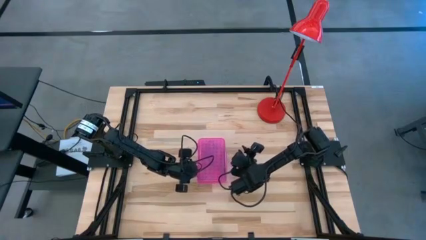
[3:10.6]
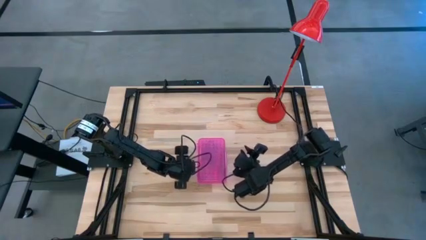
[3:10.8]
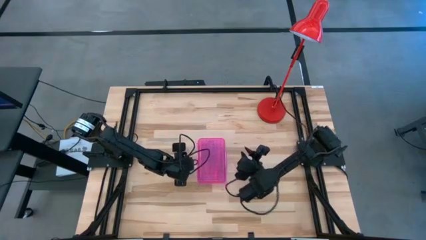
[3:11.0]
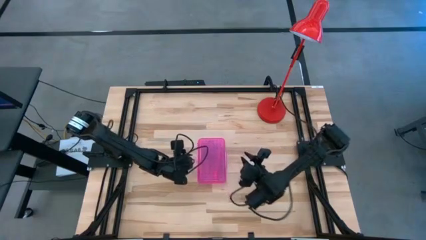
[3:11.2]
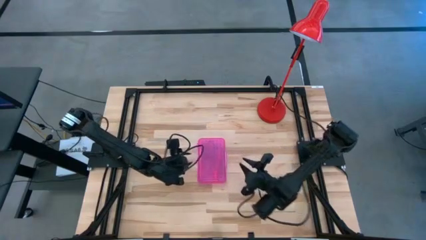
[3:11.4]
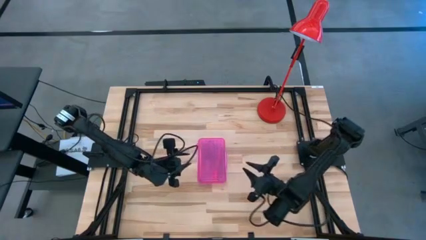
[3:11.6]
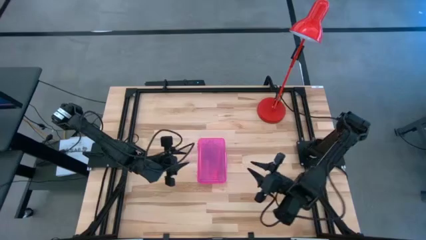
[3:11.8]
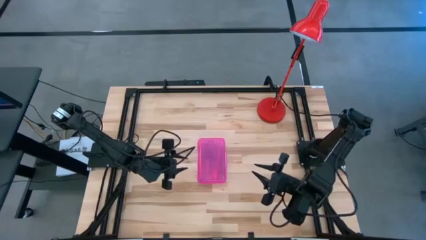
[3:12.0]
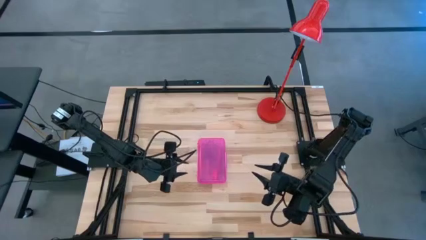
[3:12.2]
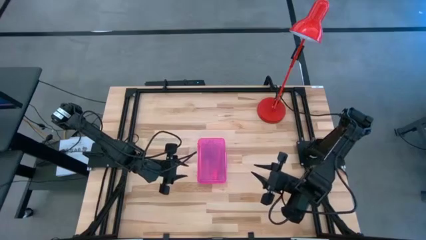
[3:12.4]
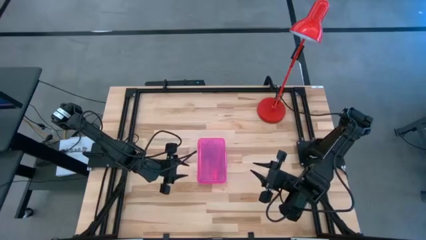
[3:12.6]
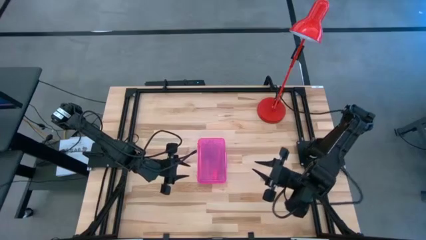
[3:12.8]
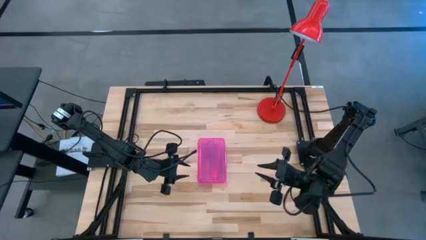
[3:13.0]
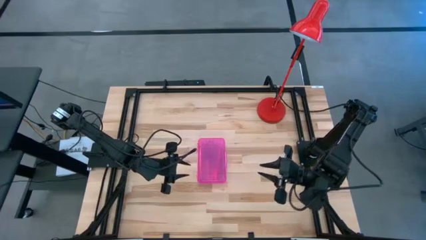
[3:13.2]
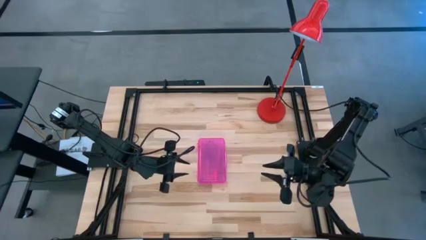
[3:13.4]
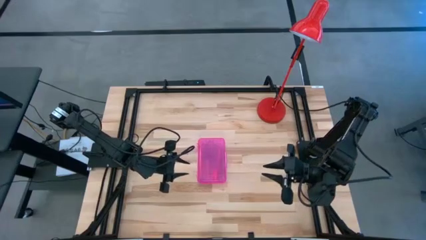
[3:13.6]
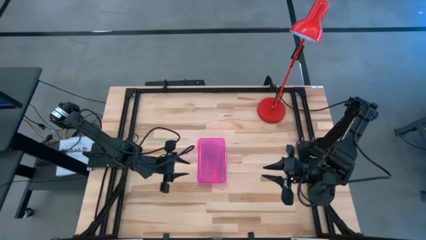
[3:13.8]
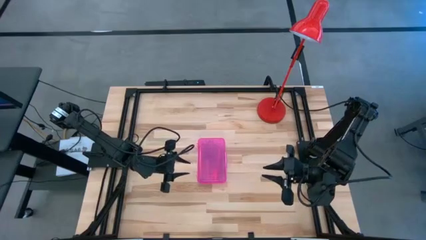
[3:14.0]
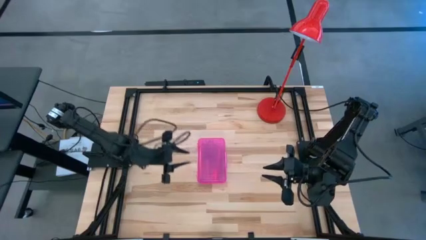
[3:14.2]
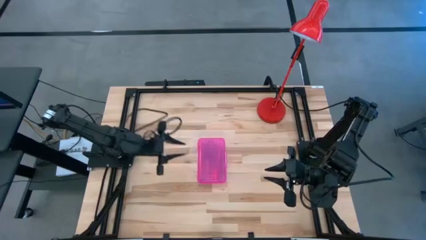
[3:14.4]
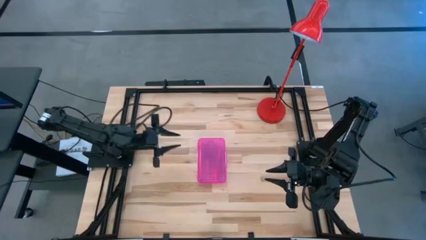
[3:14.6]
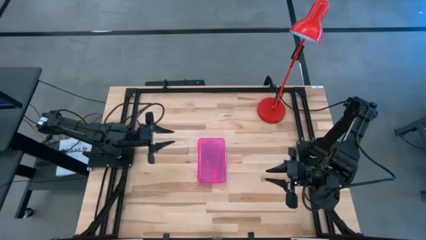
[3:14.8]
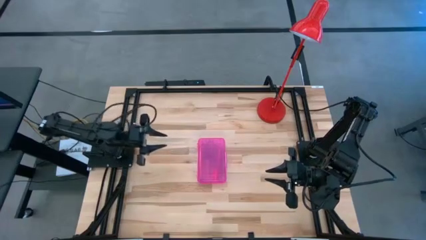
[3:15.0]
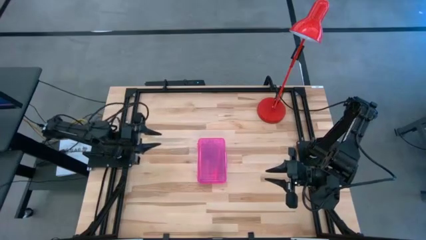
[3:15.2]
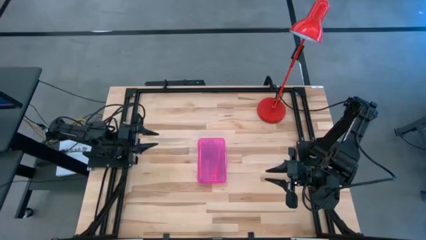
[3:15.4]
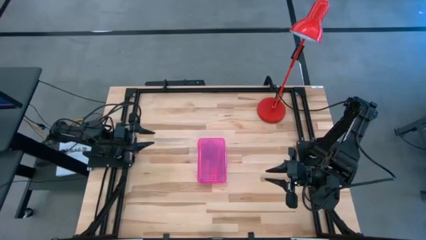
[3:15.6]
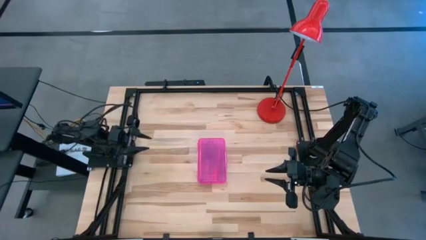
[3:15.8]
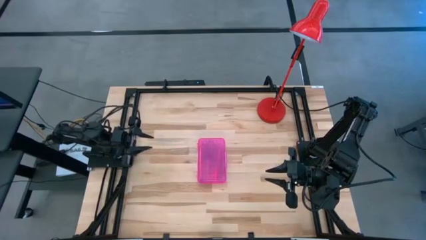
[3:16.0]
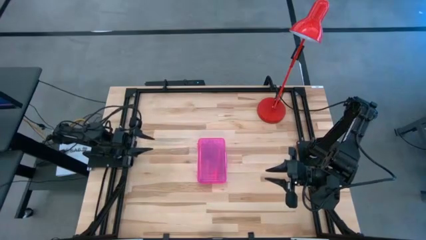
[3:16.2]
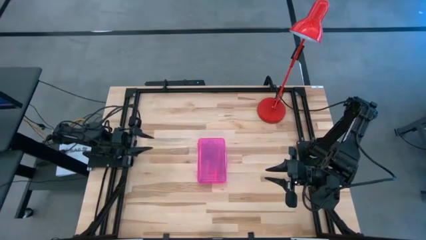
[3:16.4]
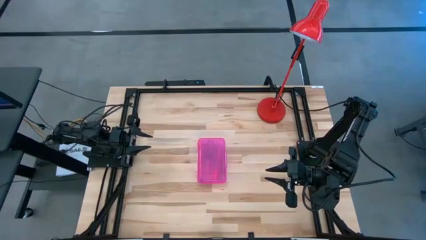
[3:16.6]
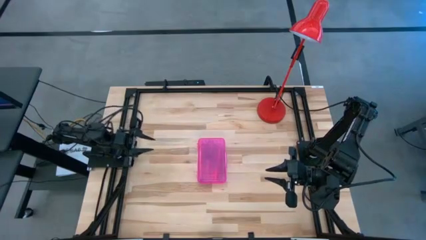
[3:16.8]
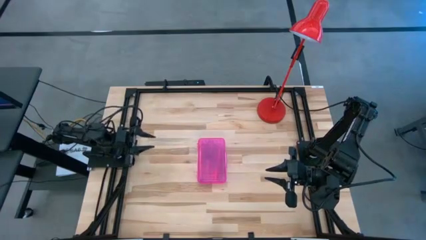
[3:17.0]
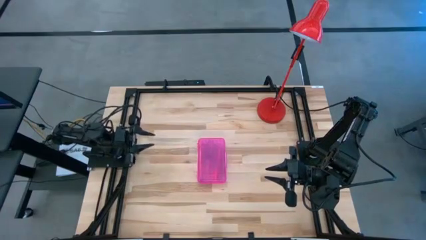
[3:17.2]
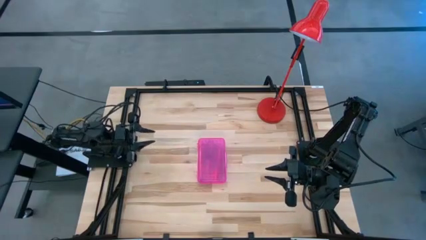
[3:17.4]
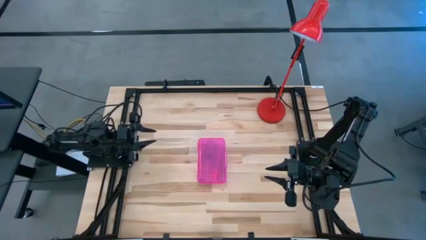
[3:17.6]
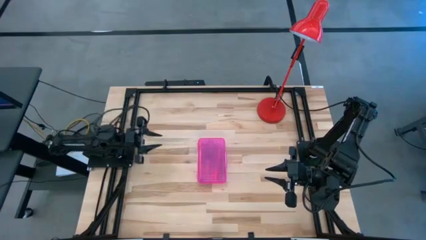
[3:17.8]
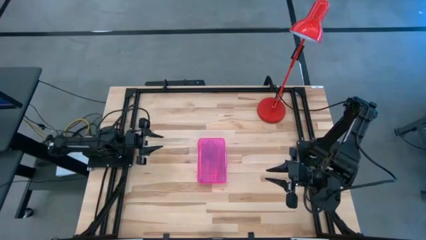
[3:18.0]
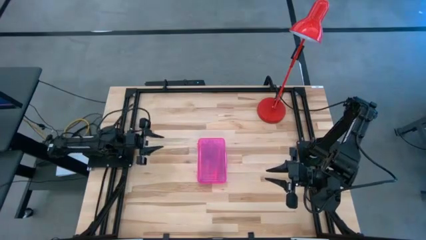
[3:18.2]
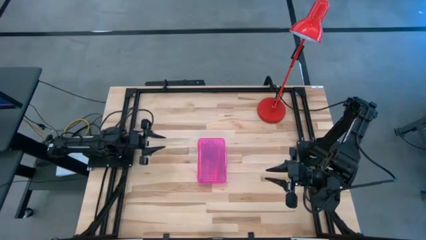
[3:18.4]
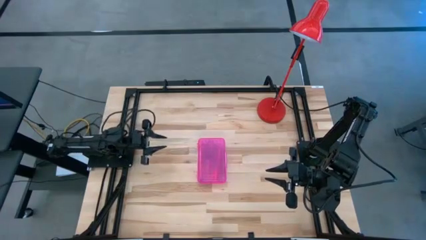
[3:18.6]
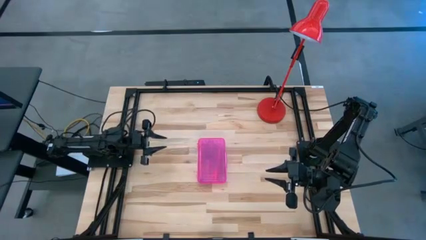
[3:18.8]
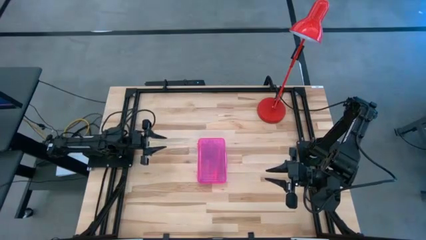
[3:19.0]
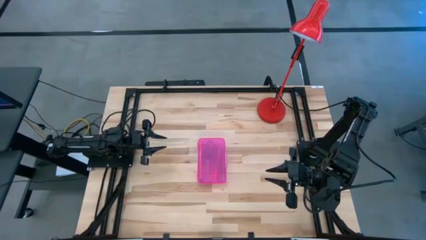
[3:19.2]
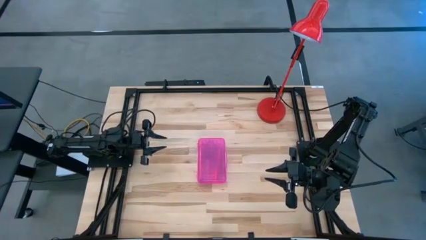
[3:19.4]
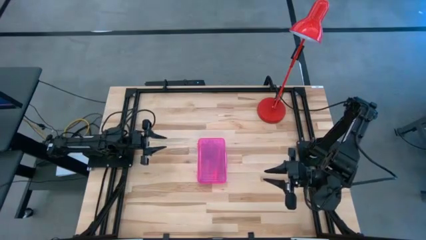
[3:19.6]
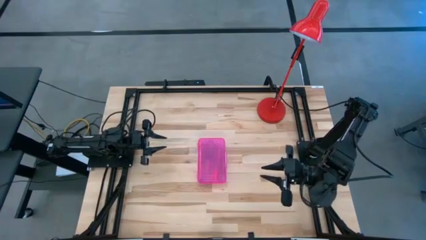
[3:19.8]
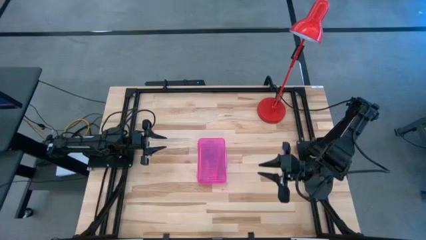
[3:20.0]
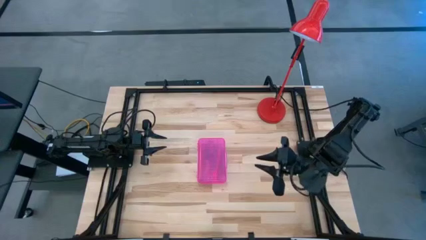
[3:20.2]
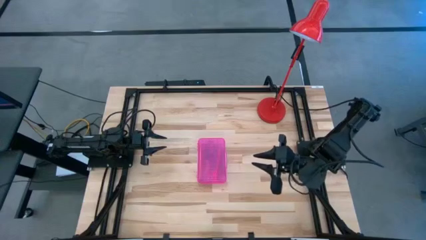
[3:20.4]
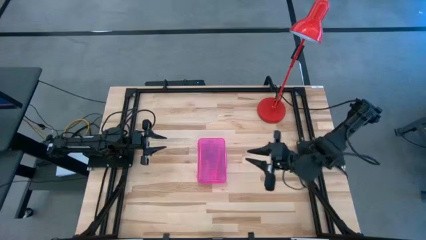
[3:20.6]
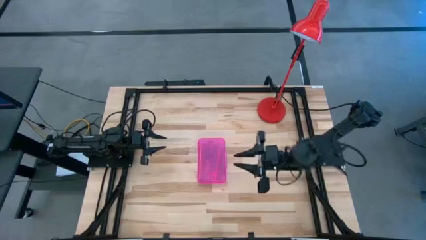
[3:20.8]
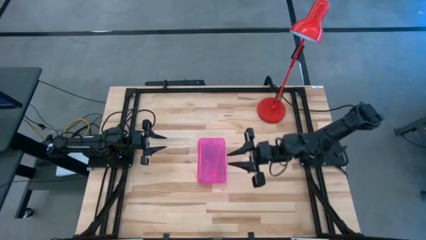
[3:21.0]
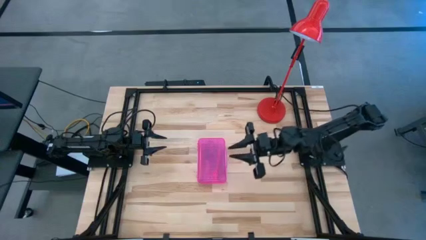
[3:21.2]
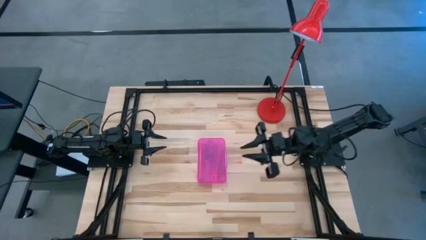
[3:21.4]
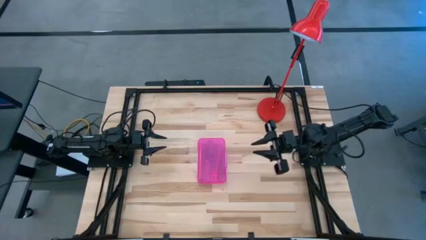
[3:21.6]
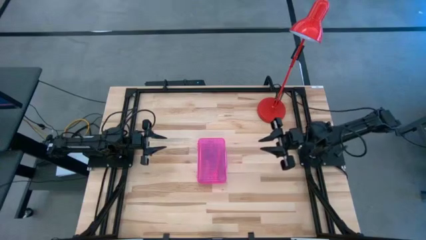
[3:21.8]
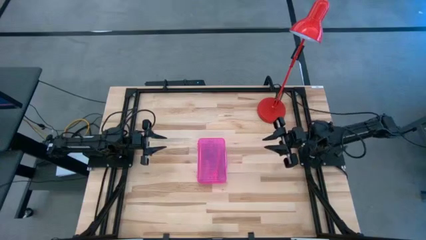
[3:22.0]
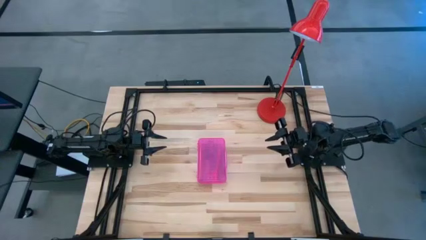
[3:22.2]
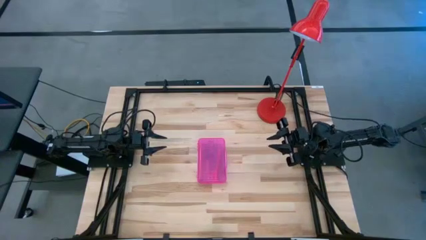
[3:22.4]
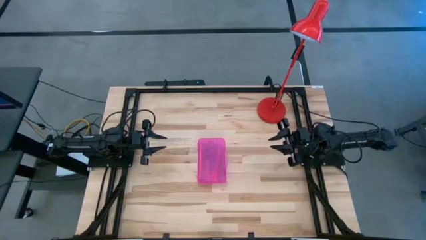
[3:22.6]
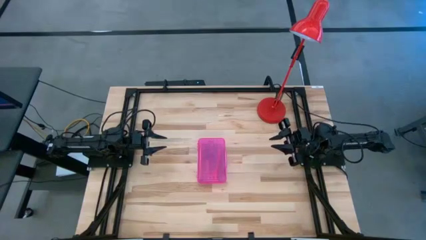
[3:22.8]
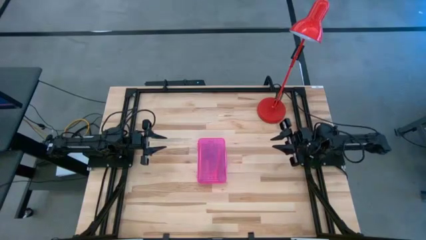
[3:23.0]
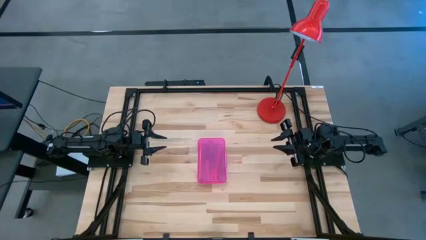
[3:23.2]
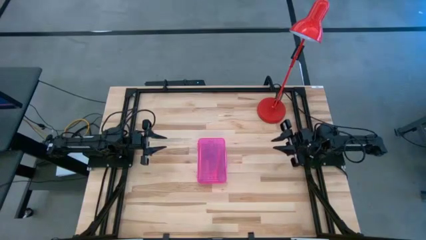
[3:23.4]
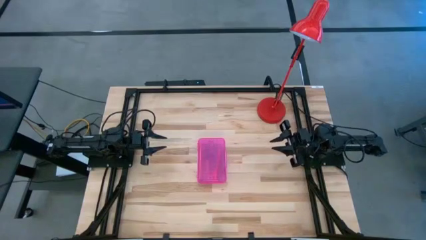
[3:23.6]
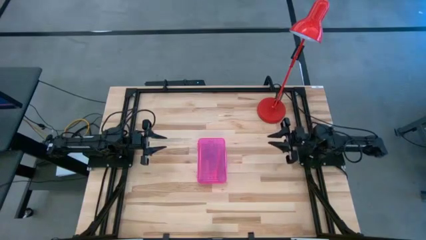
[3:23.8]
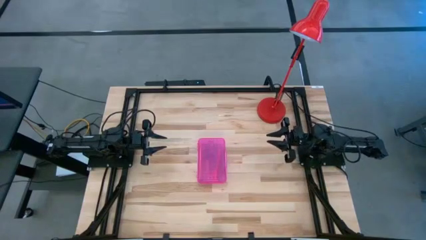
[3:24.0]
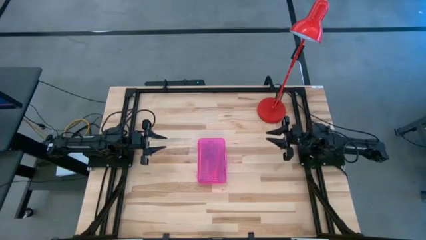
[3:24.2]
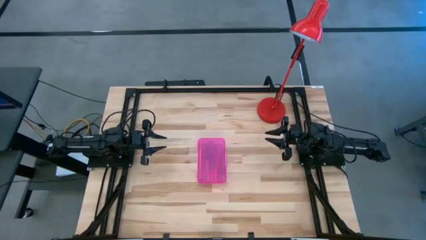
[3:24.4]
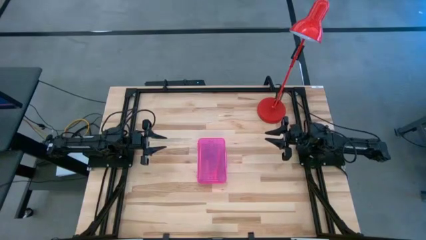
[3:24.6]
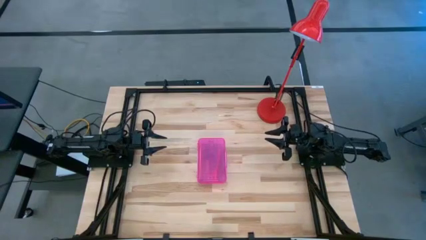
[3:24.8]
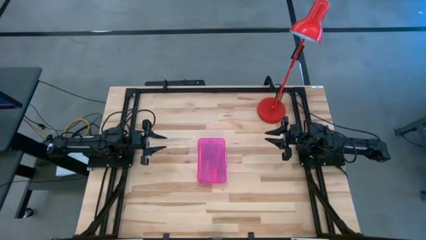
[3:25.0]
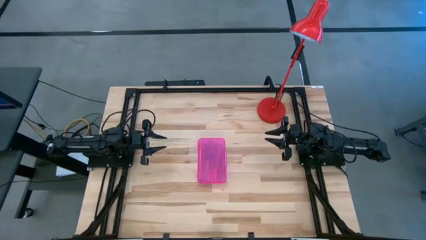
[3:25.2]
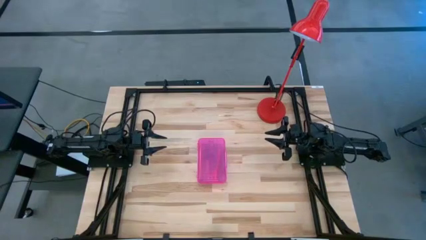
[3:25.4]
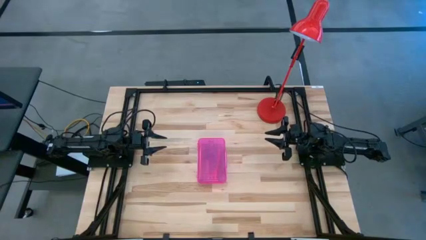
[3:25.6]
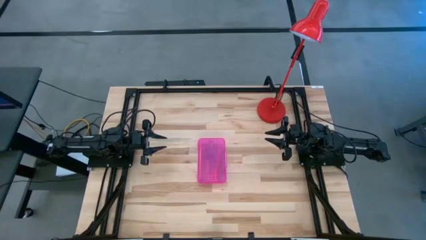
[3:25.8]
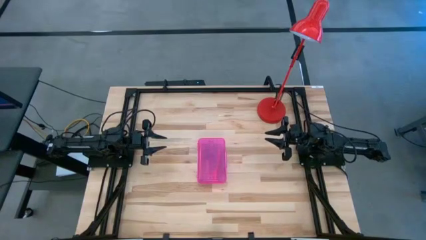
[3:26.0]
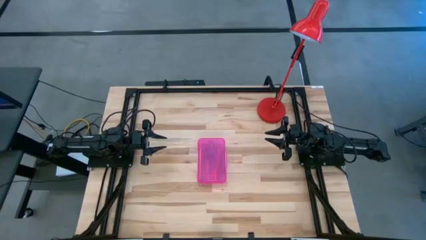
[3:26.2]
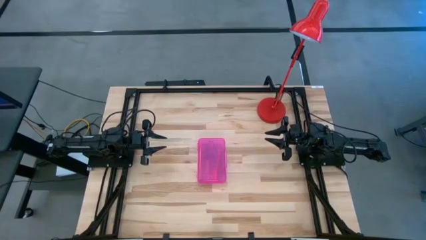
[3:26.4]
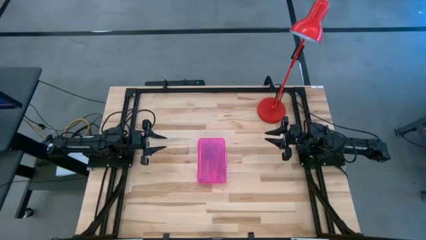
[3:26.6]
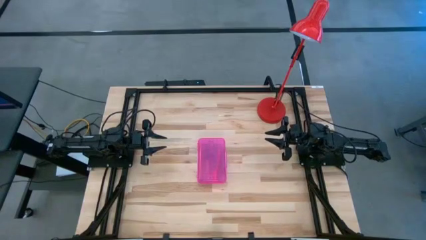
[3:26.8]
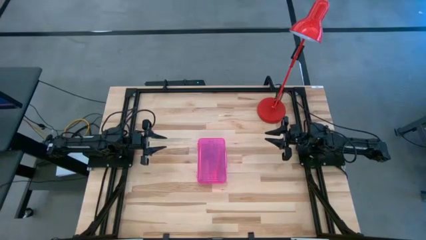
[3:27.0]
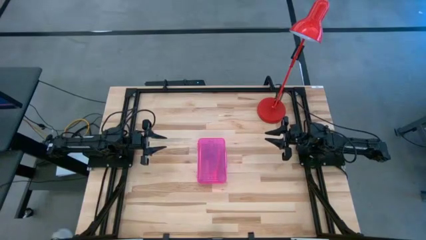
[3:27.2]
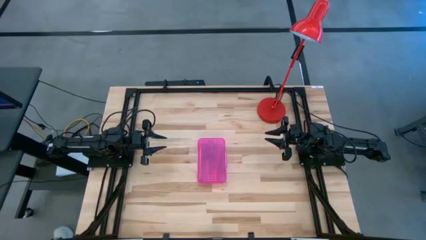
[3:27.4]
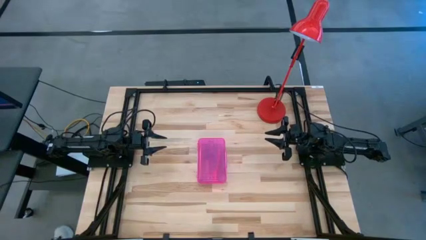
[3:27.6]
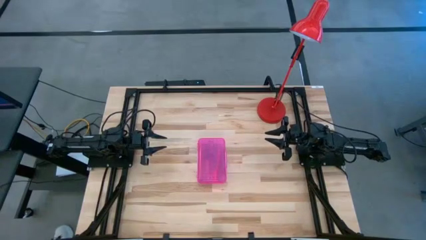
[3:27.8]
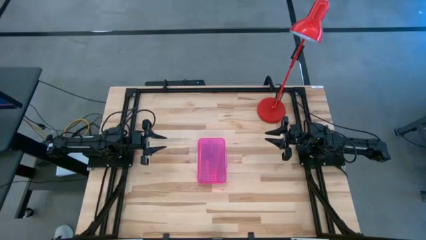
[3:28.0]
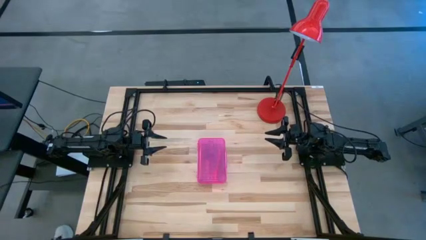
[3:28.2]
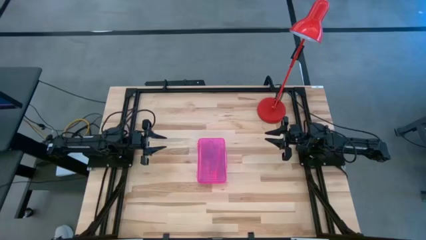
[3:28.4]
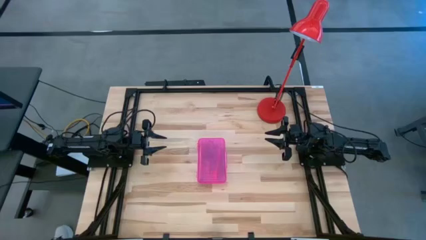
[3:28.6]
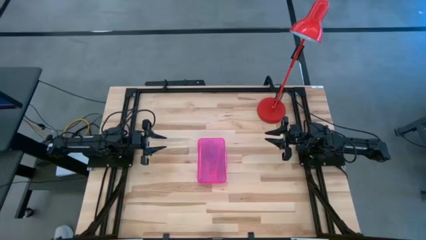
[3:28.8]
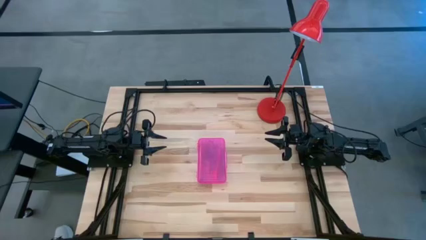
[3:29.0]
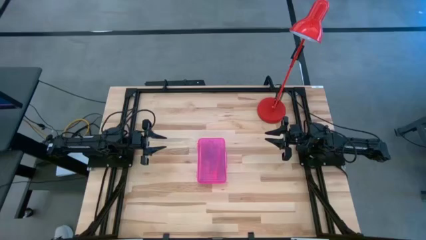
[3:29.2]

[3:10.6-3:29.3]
Task: Pick & place school supplies into a supply box
Return to Home Position
